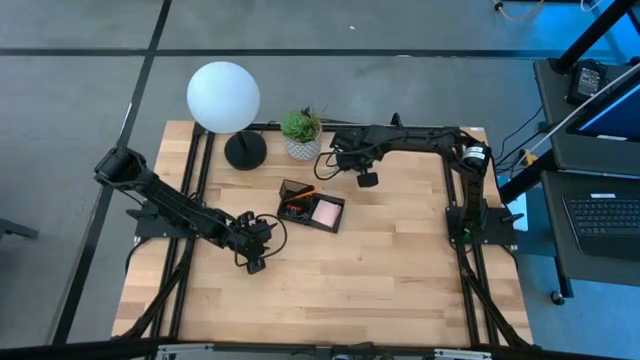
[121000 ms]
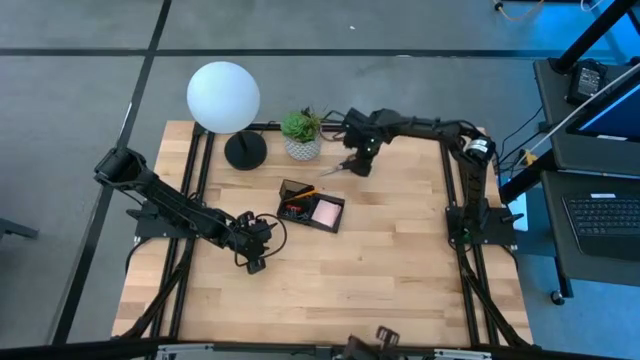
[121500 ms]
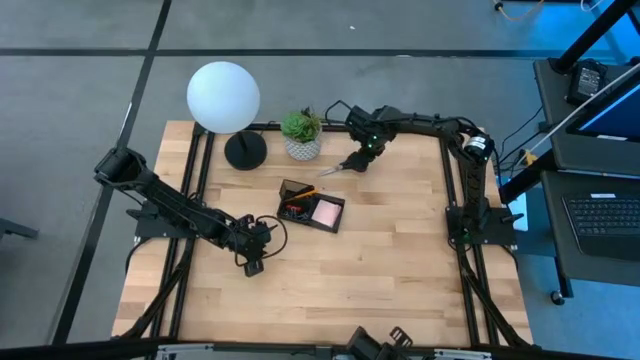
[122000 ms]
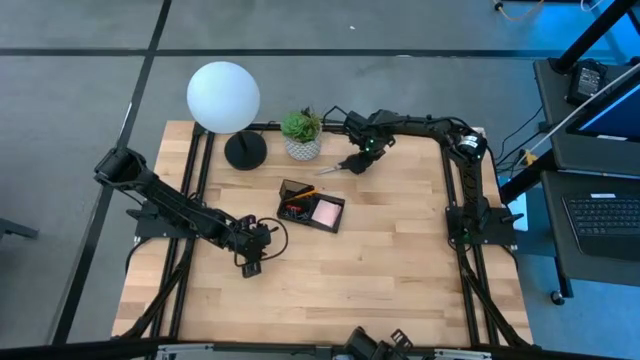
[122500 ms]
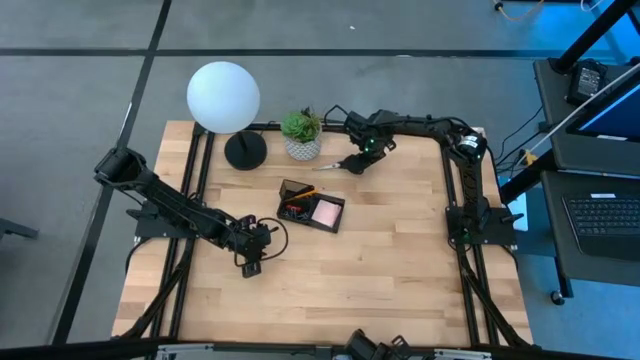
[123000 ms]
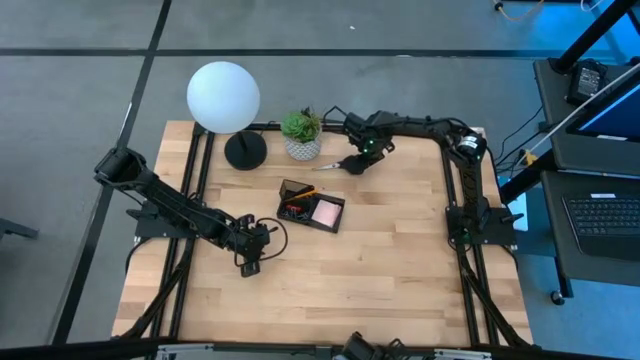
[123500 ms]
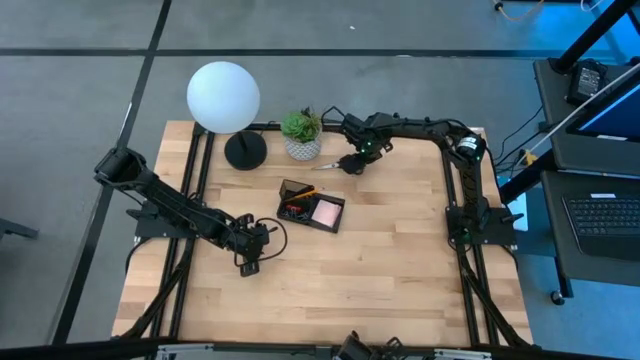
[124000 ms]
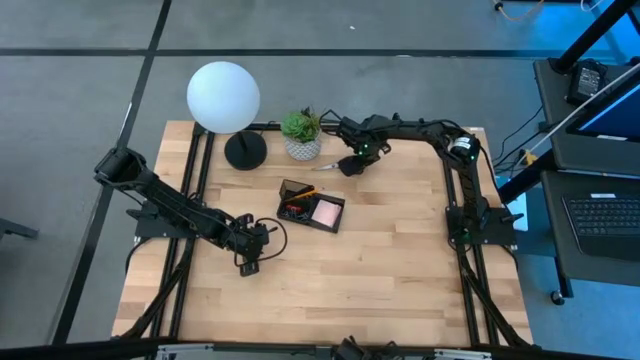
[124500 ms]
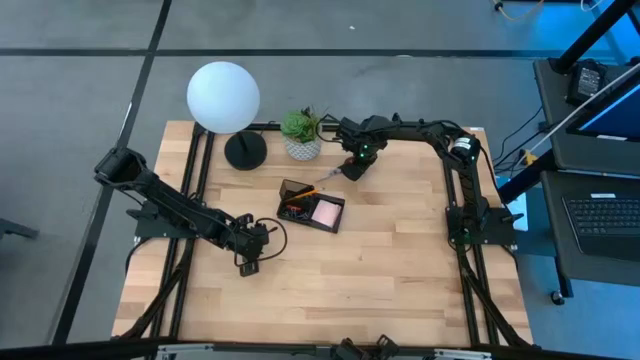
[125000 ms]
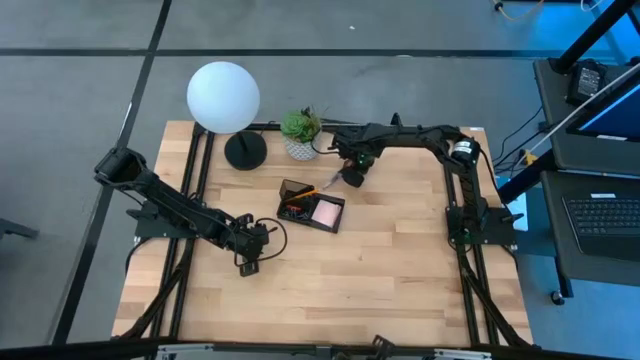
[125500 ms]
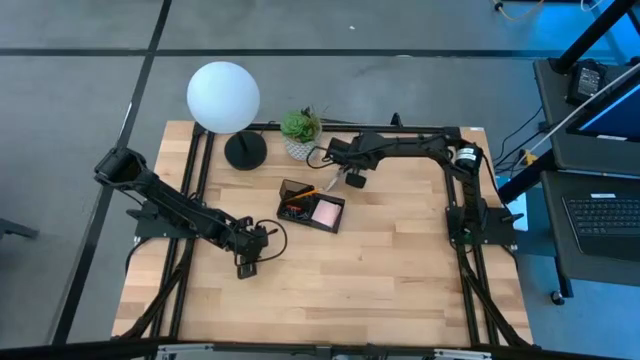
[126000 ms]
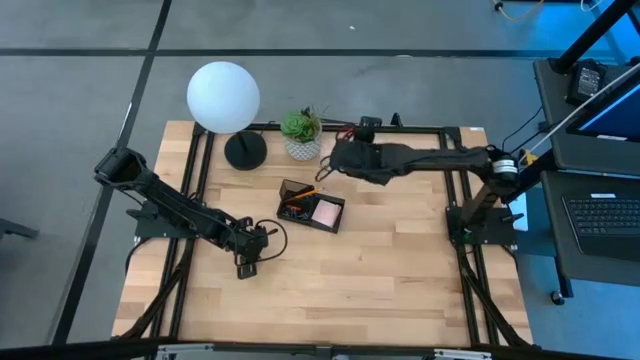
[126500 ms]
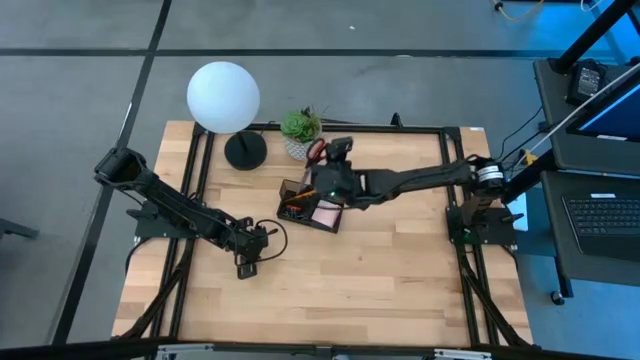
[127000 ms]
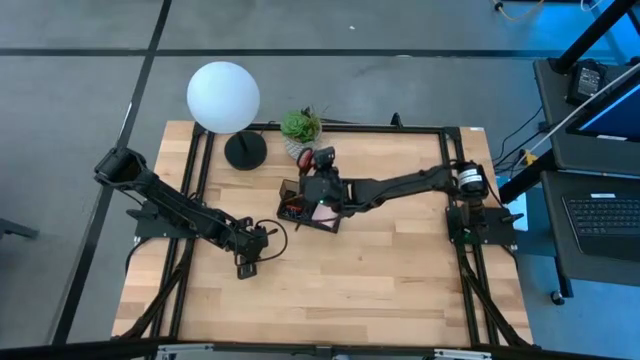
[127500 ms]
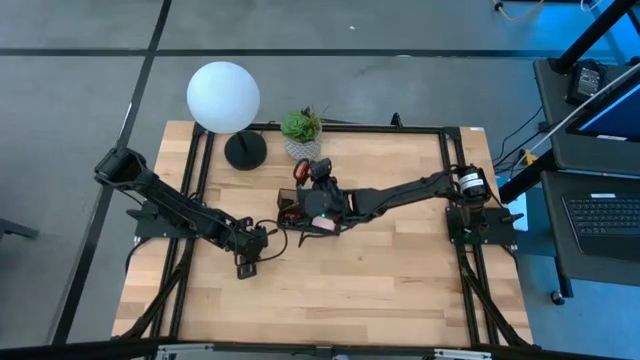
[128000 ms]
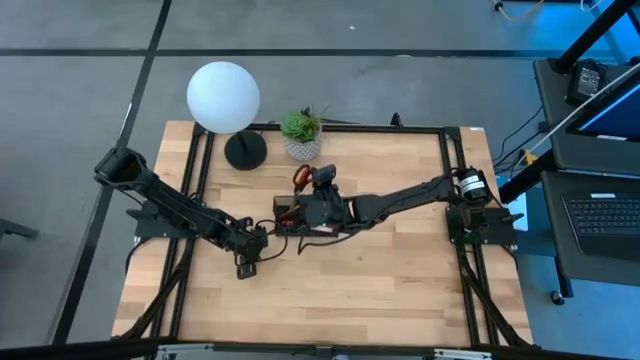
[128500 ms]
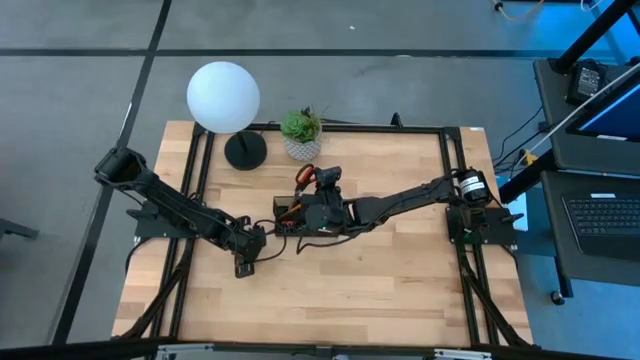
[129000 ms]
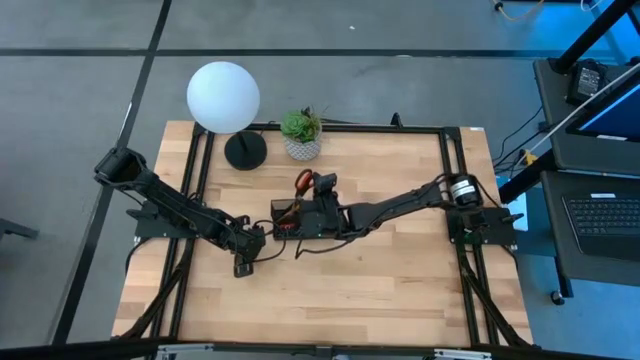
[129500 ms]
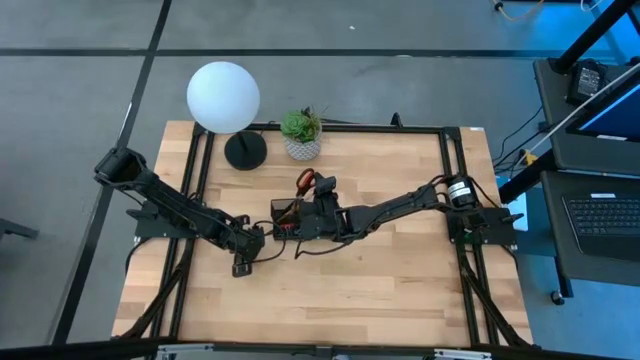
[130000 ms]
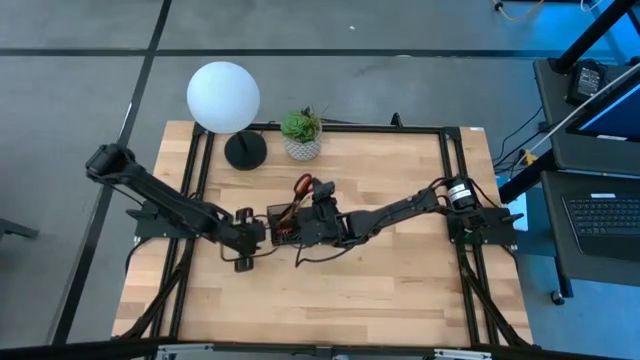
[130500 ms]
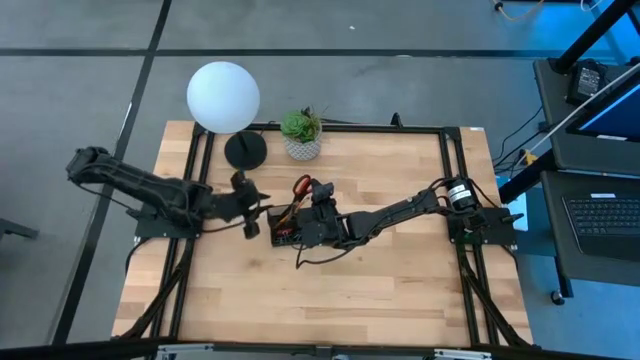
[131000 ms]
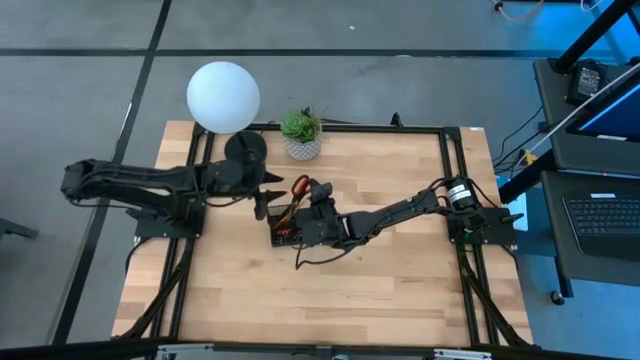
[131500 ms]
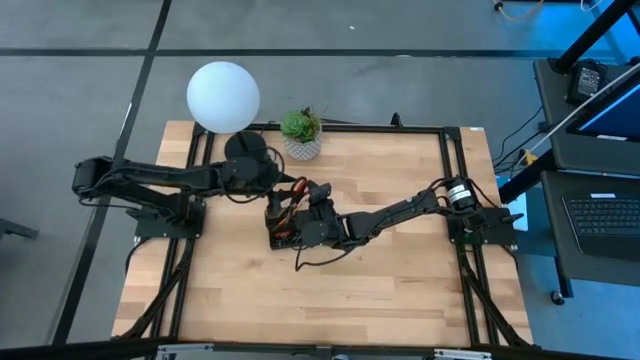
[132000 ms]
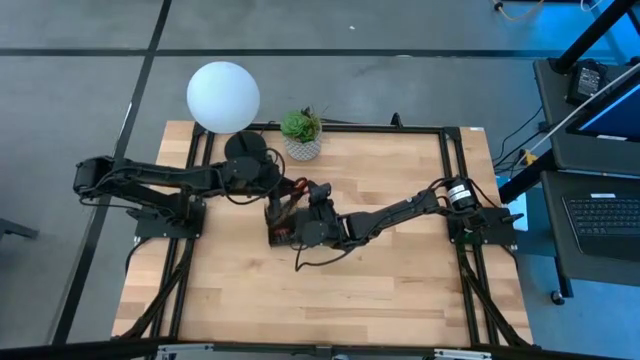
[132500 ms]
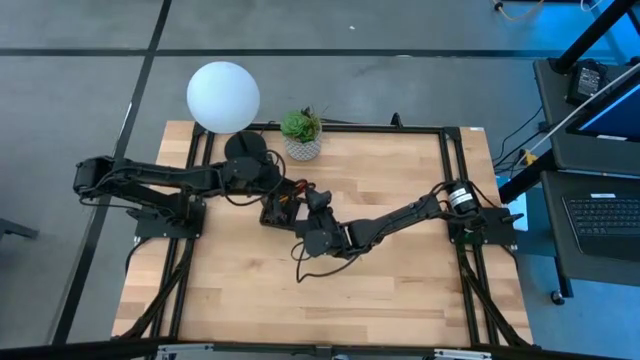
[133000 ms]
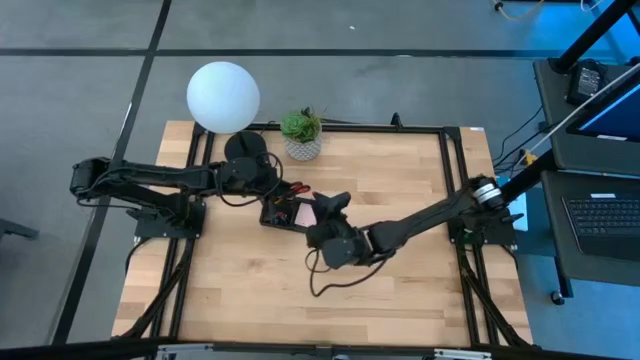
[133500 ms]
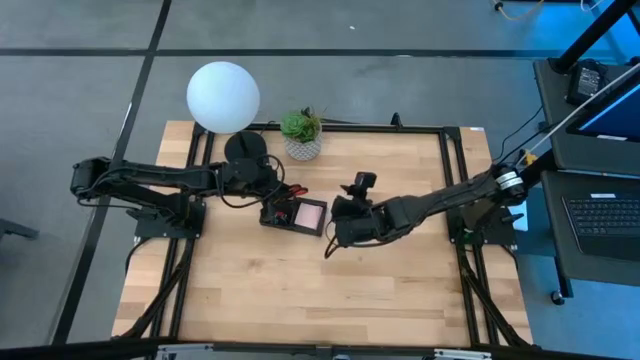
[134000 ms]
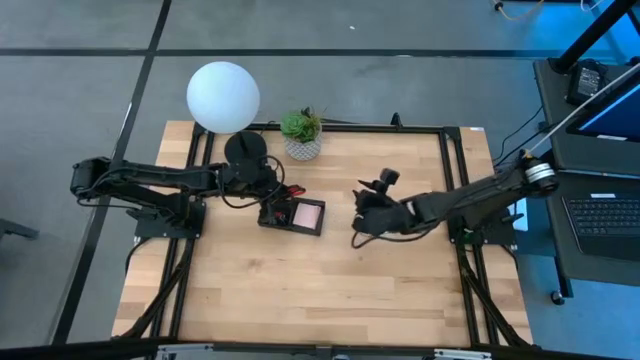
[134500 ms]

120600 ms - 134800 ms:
Task: Pick and place office supplies into organizer
Put the black scissors into the black desk organizer

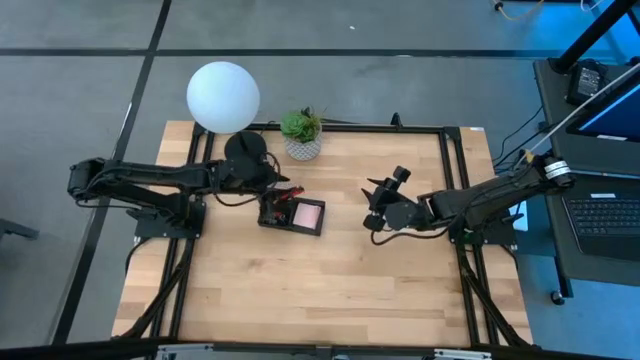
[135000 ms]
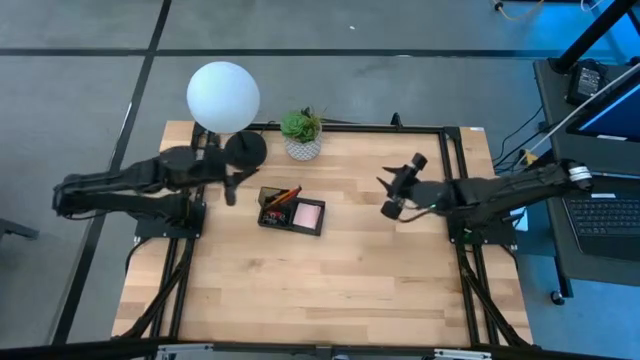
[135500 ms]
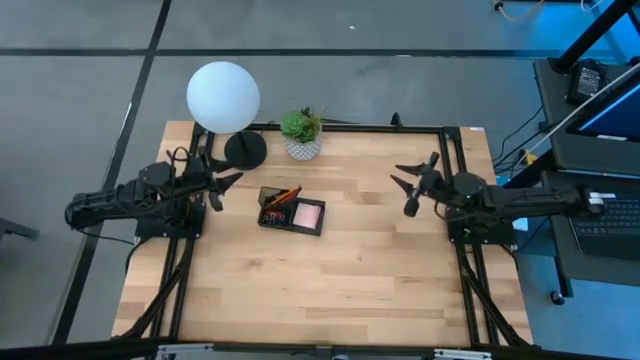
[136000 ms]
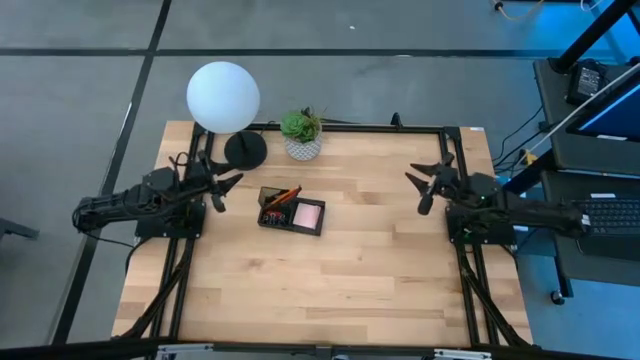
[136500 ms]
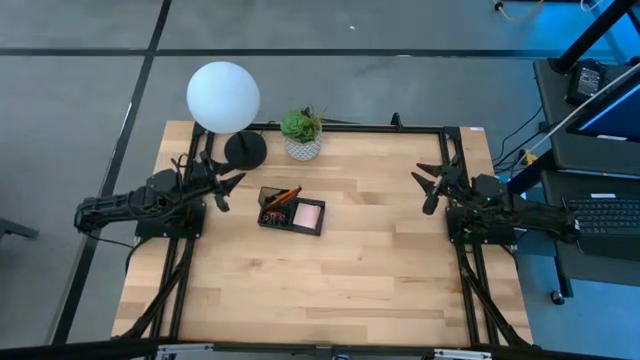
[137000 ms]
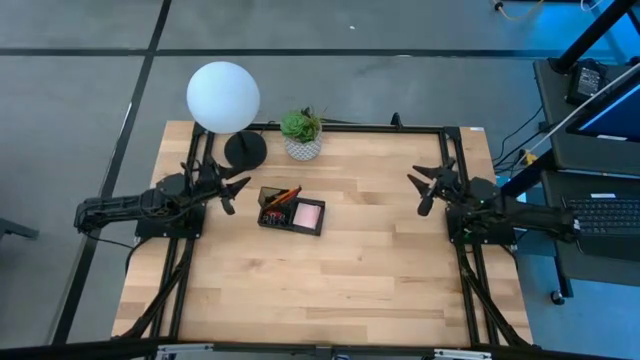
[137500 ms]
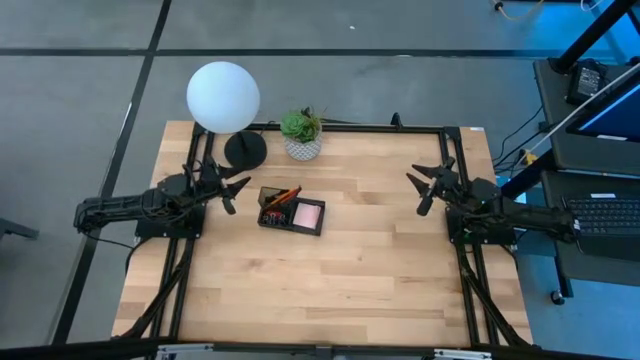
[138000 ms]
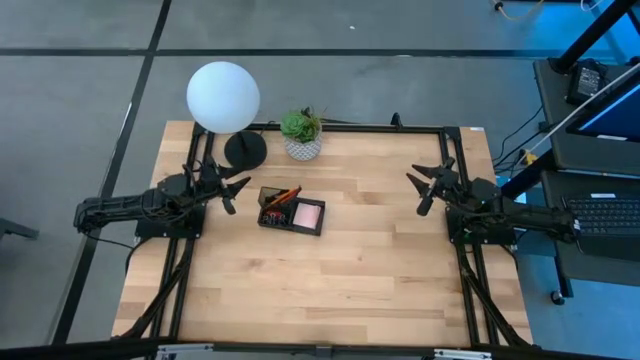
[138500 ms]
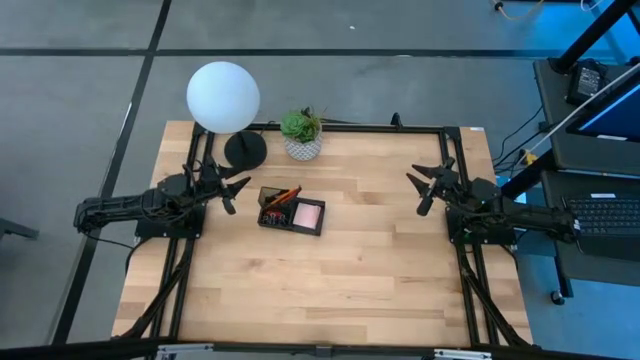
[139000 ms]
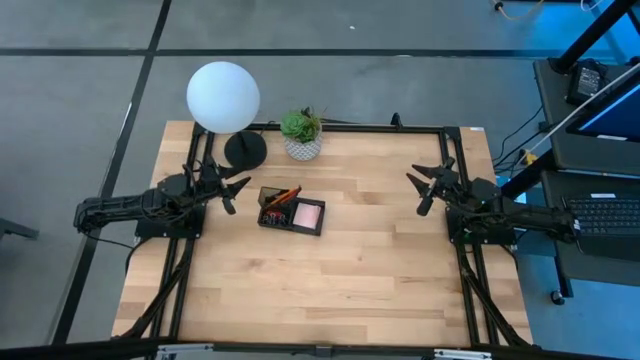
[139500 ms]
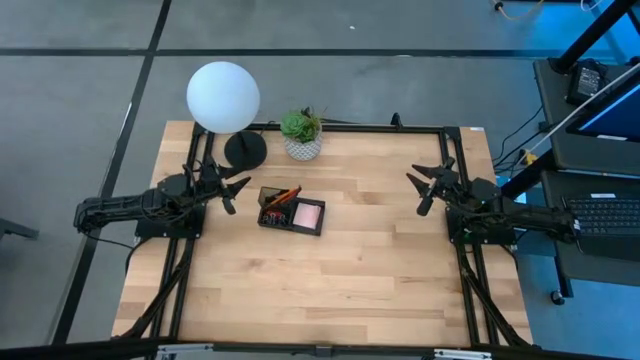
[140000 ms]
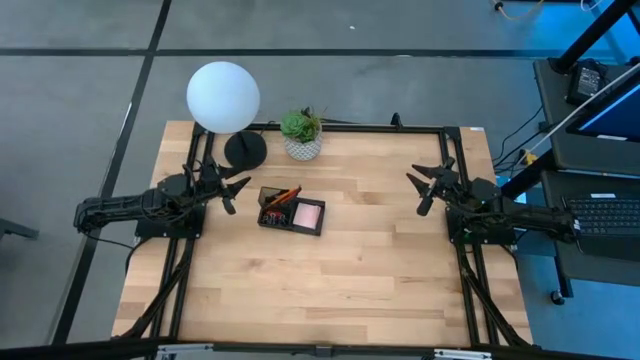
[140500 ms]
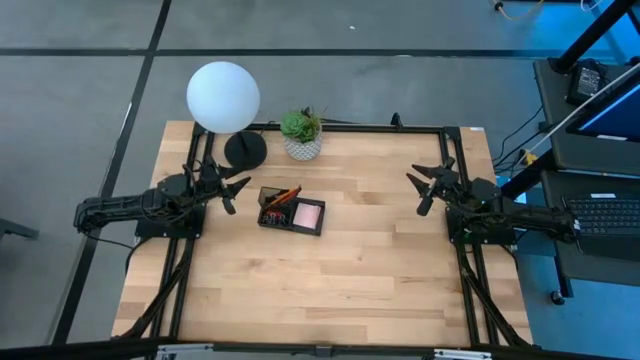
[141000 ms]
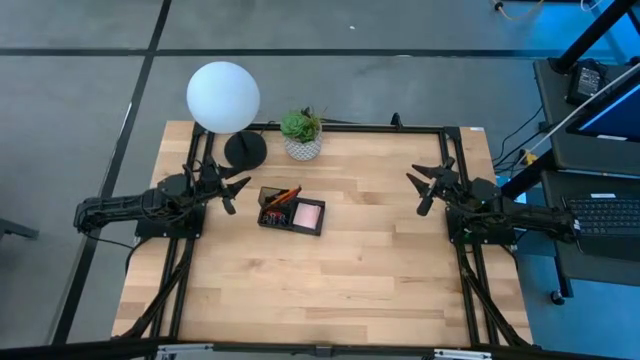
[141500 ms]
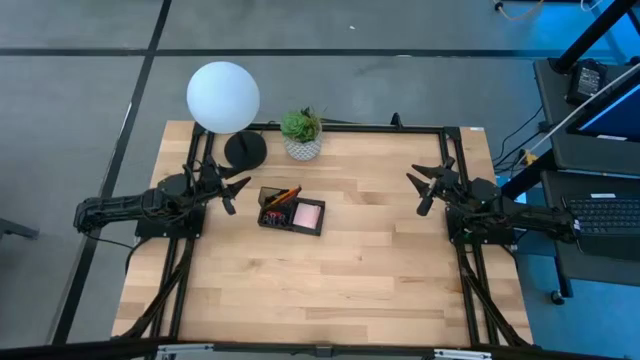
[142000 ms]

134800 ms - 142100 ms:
Return to Home Position
